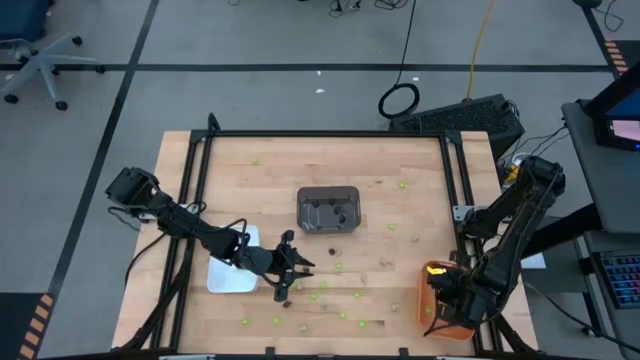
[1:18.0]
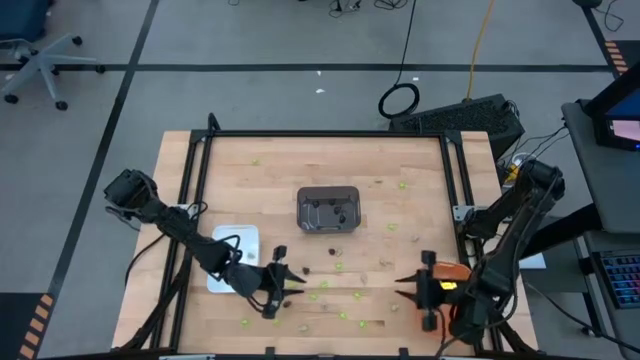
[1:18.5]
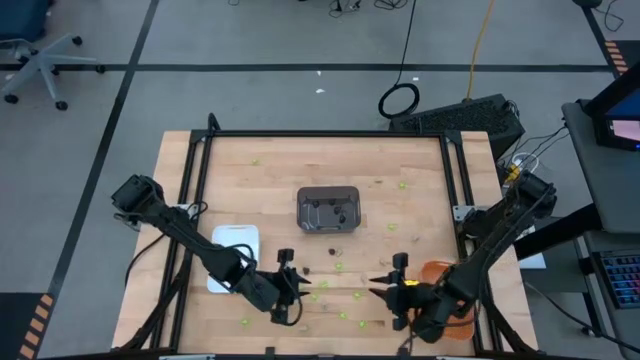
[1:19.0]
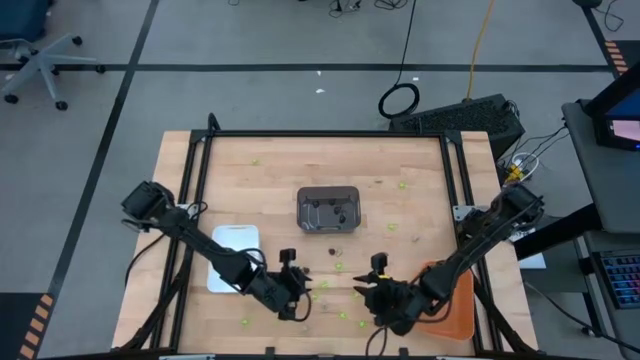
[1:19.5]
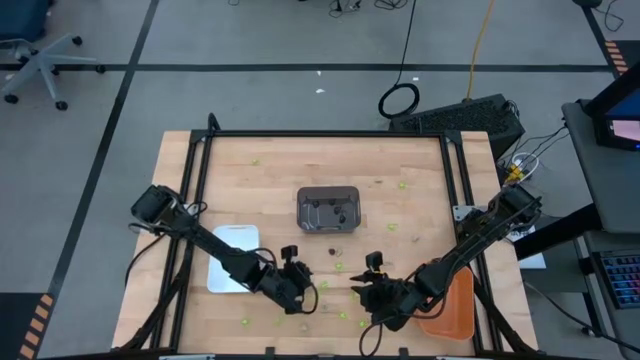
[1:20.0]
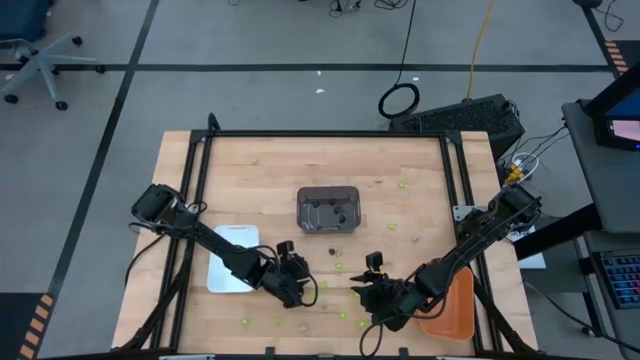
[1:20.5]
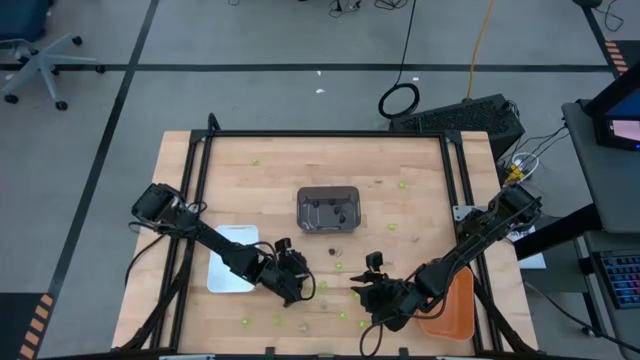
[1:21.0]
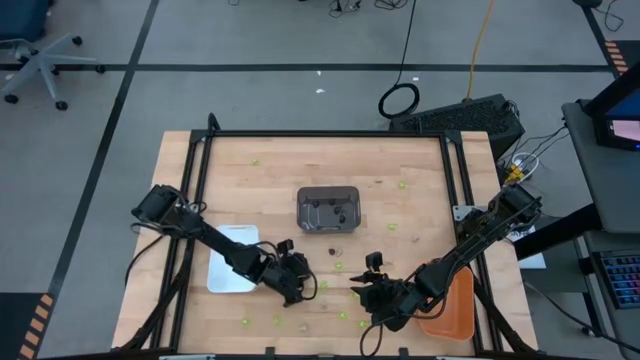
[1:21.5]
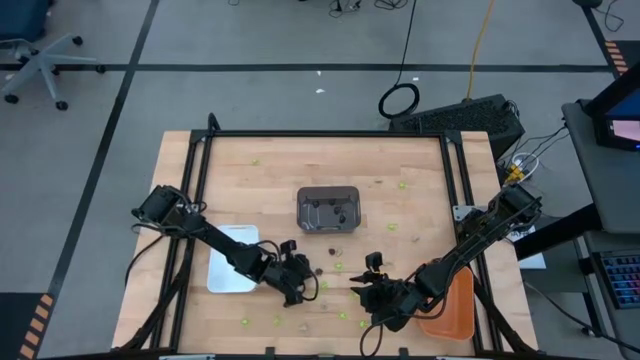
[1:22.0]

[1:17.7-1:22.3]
Task: Sort Halloween decoration
Put the black skull toy into the black bin

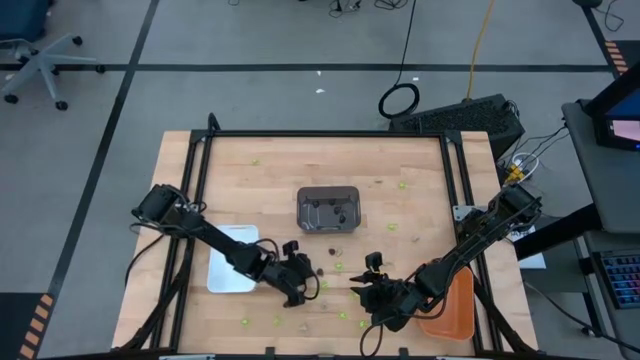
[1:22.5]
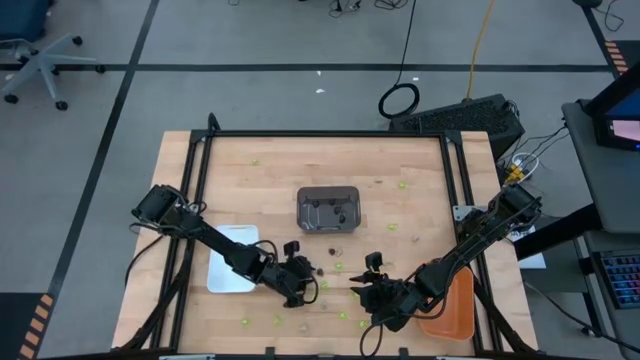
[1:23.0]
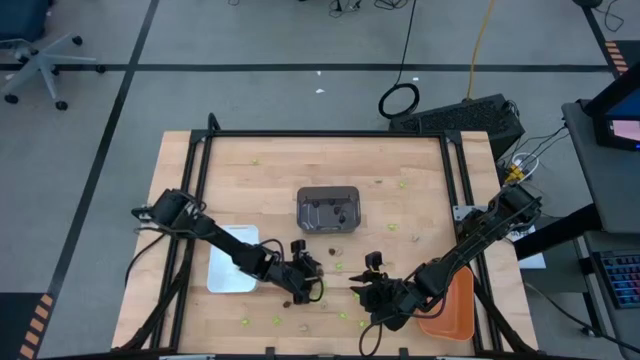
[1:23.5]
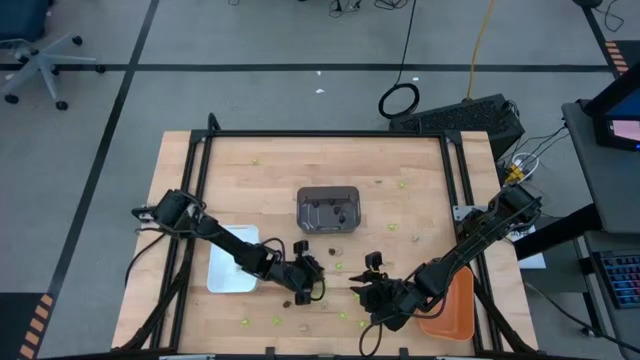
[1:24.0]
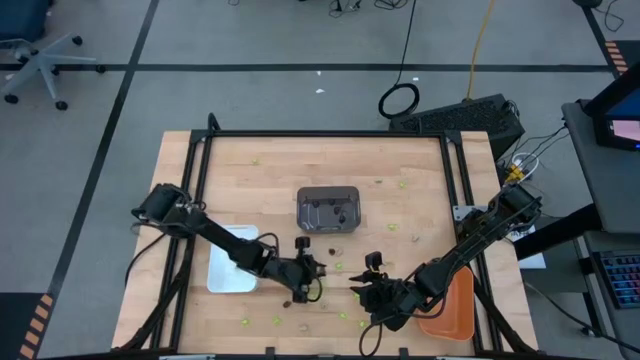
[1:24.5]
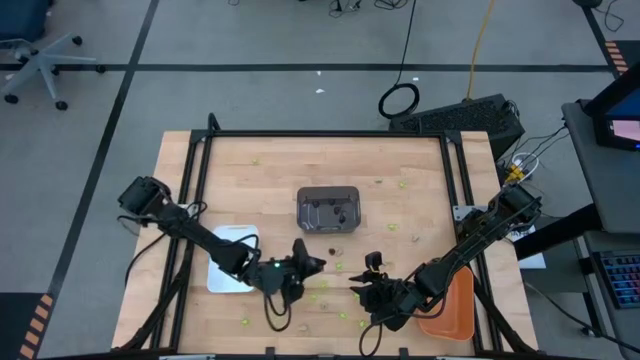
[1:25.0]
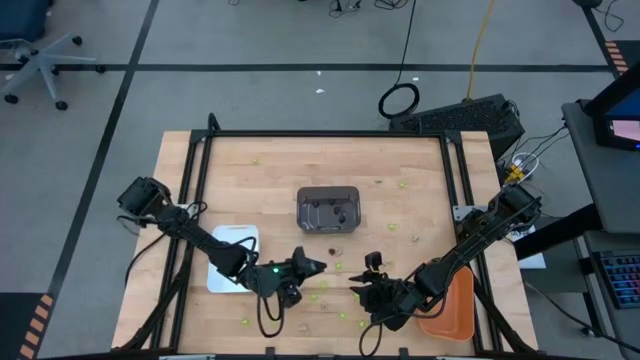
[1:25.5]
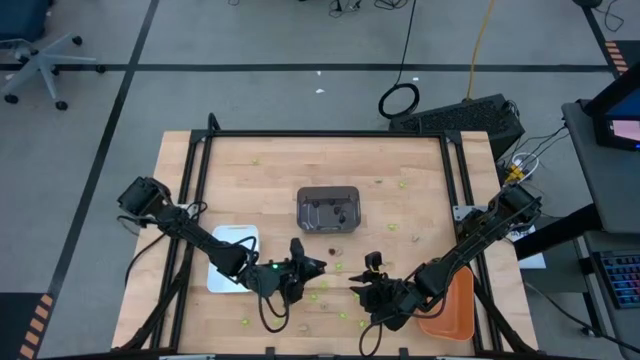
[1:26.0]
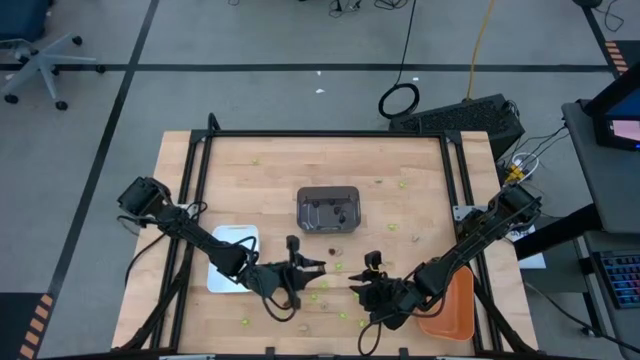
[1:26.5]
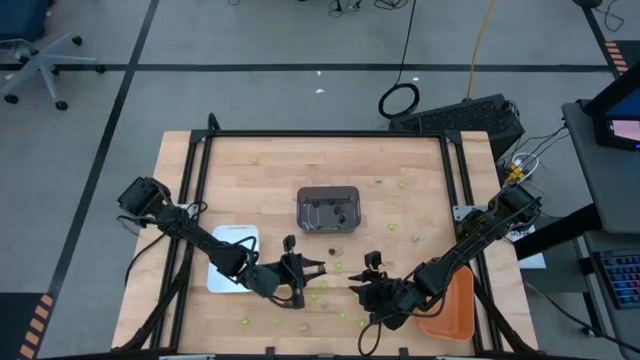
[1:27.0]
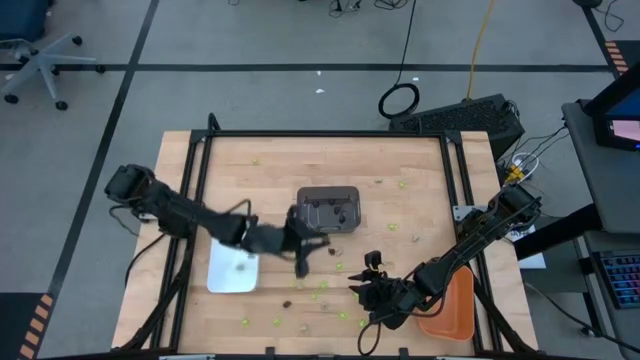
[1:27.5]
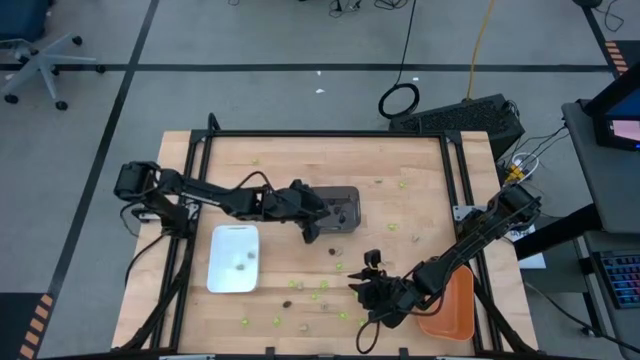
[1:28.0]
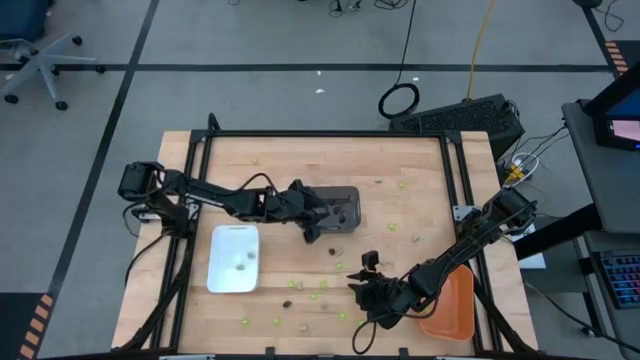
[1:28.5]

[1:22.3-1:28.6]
Put the black skull toy into the black bin

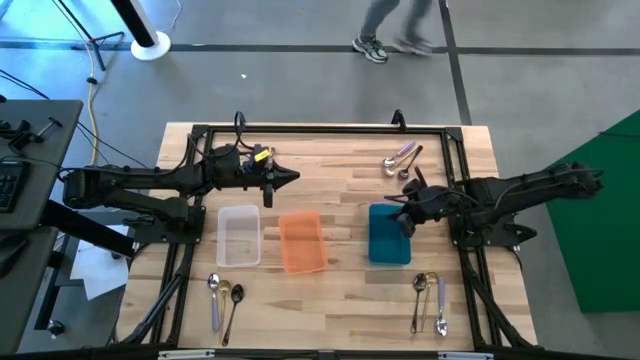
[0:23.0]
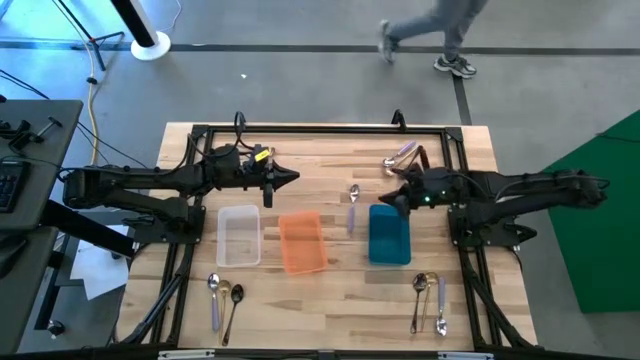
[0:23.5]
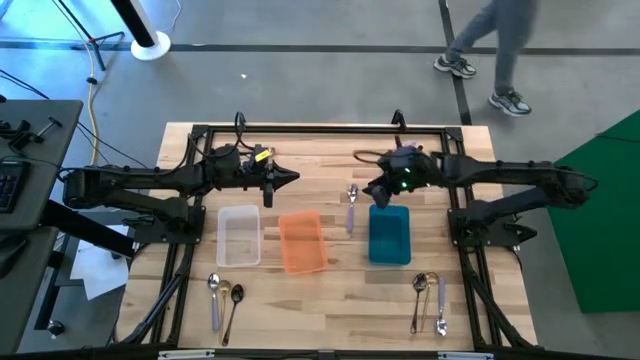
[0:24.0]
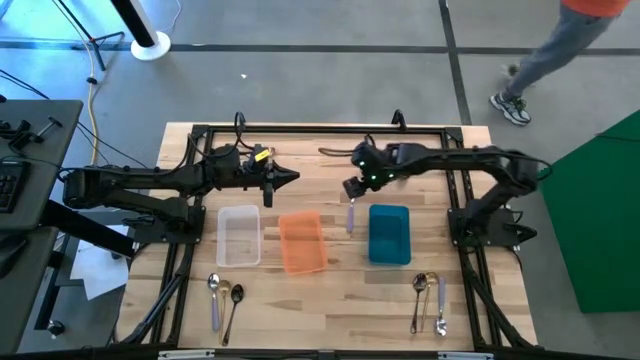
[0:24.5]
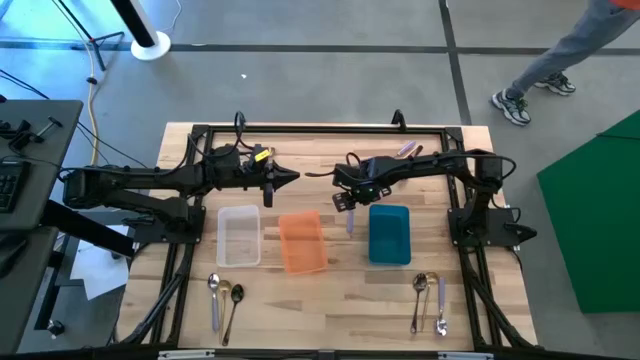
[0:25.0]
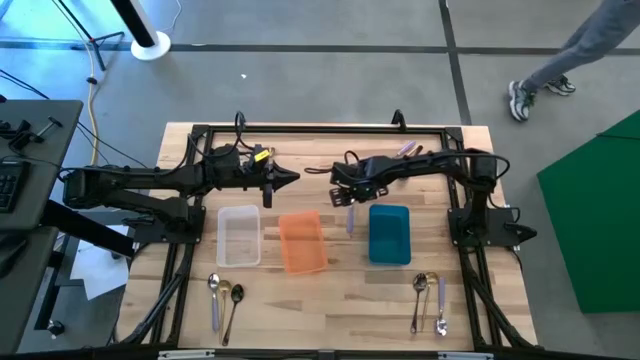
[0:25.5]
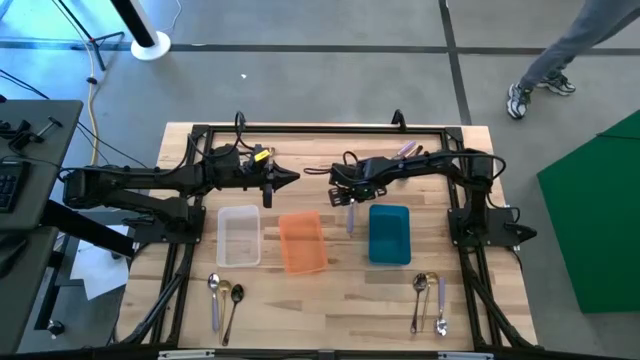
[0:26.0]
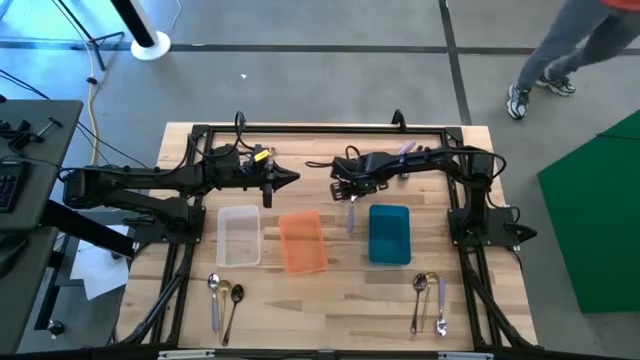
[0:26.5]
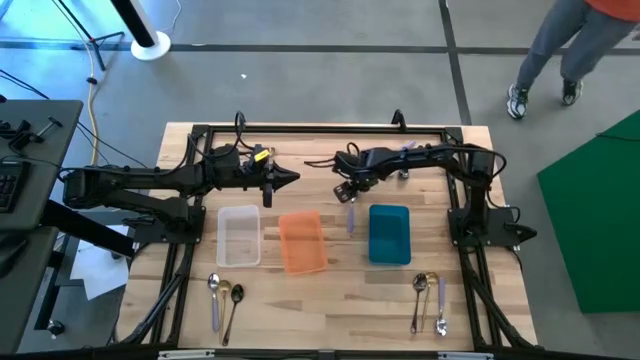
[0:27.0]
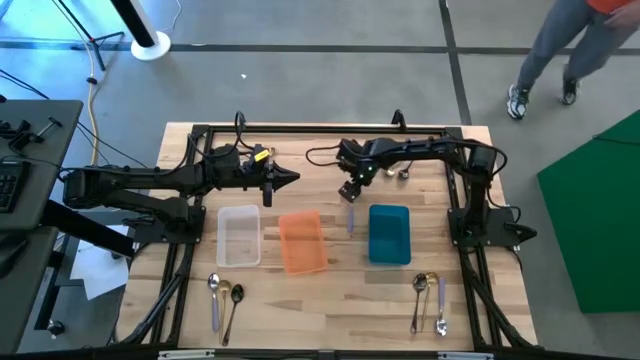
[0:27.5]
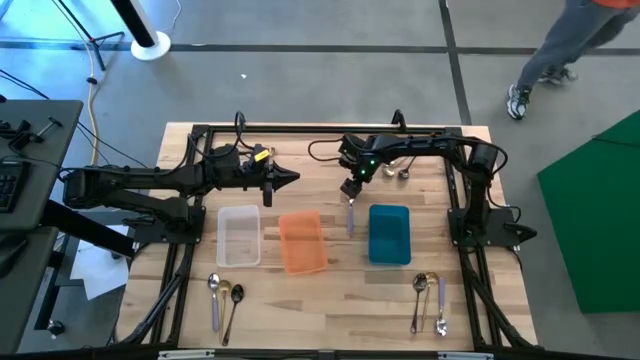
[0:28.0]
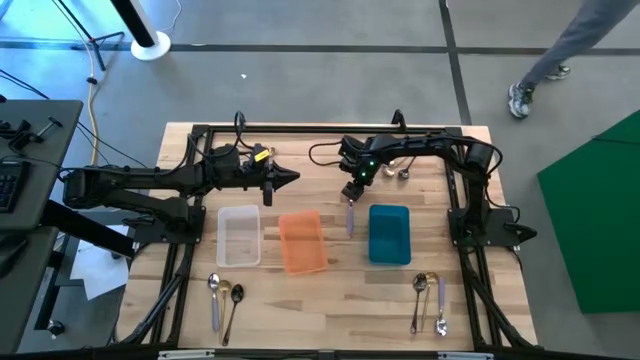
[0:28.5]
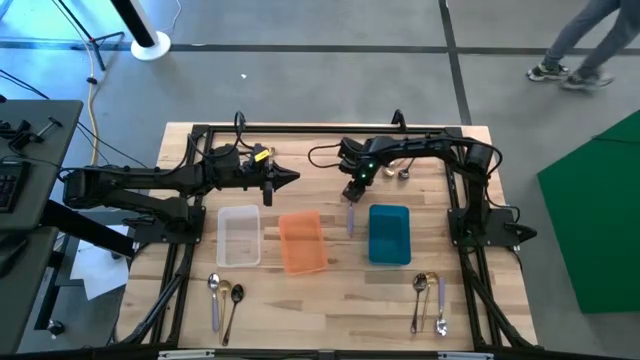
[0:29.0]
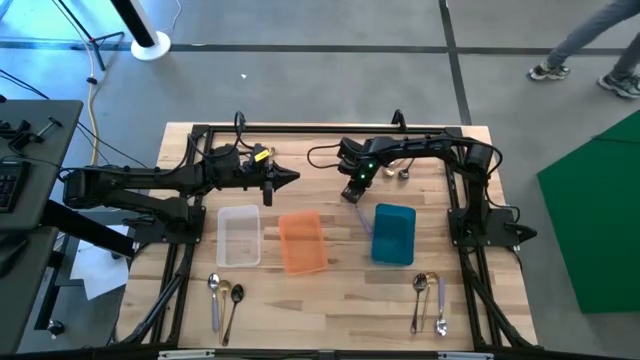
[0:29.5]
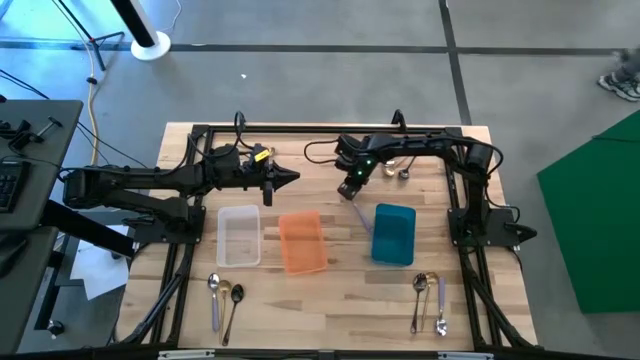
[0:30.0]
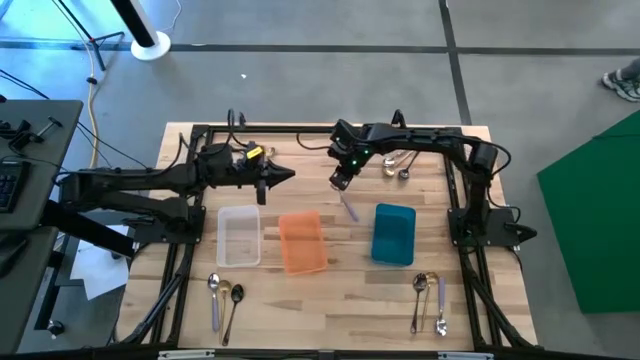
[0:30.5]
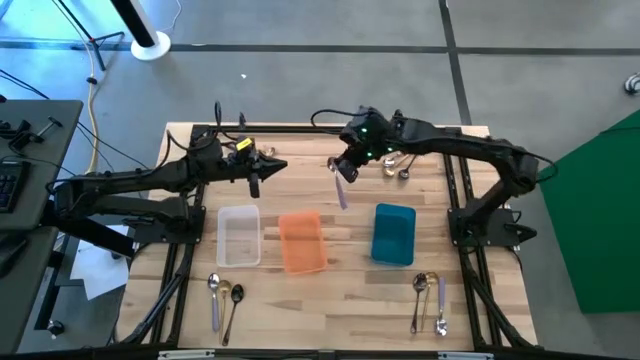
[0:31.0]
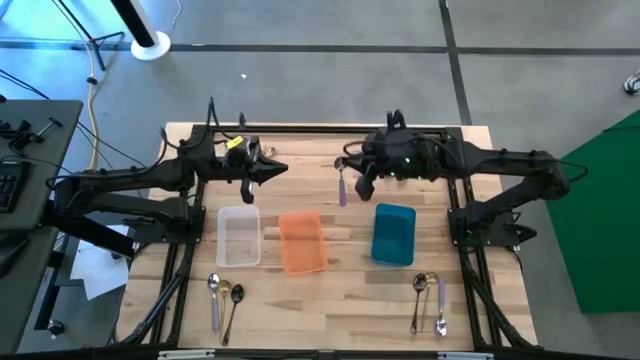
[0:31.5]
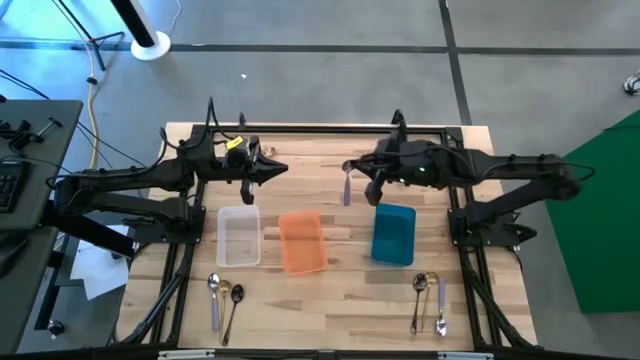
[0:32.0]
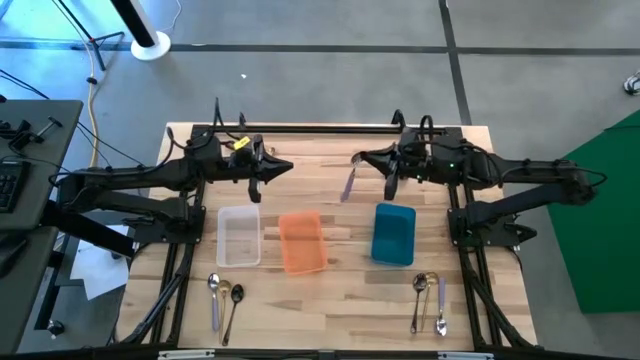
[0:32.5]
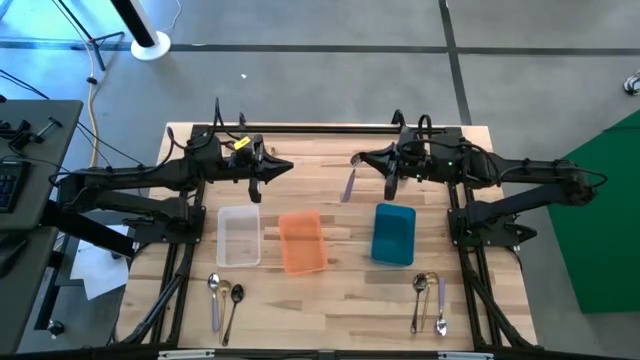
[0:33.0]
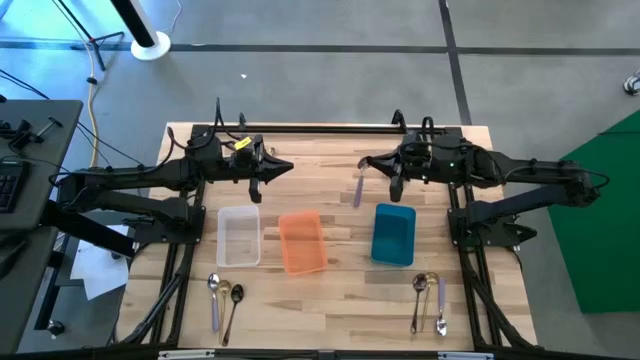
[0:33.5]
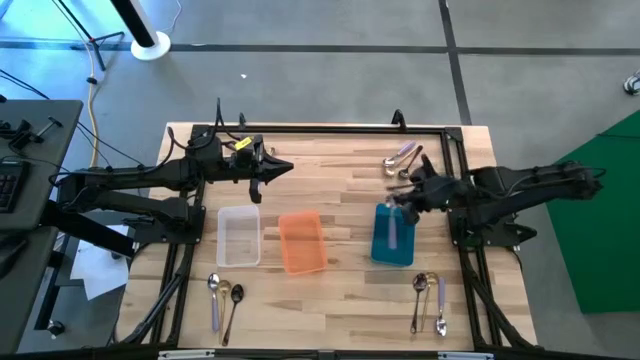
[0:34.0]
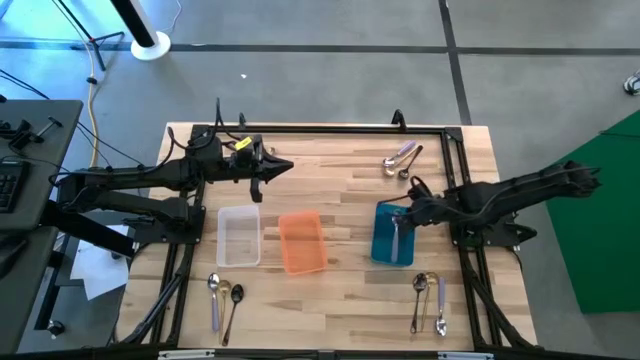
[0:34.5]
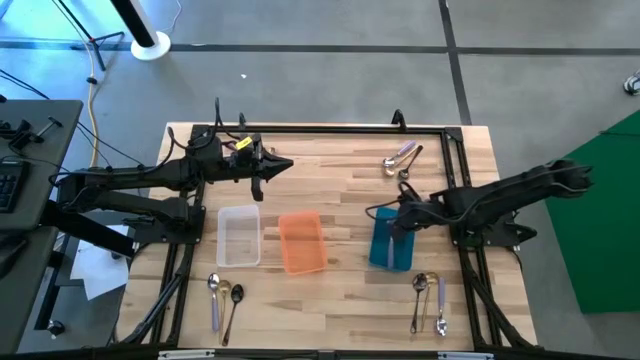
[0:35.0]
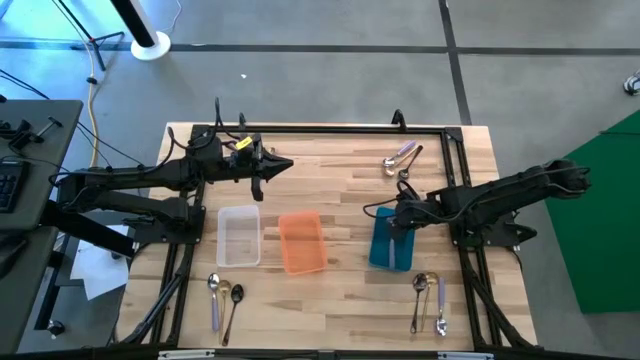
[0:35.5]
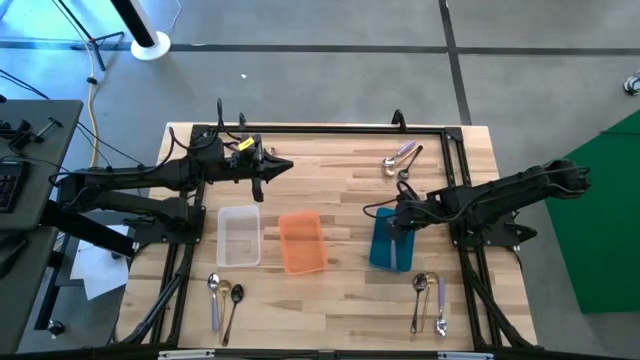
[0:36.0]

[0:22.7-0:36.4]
Task: Sort silverware by color (type)
Put the top left purple spoon into the blue bin
